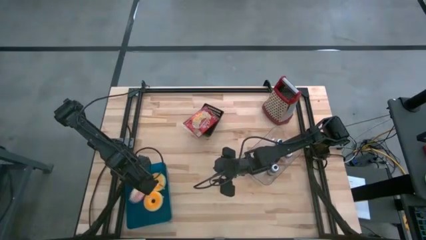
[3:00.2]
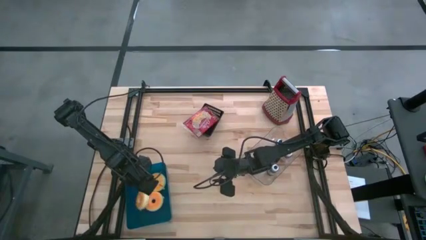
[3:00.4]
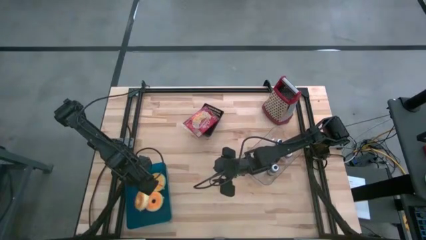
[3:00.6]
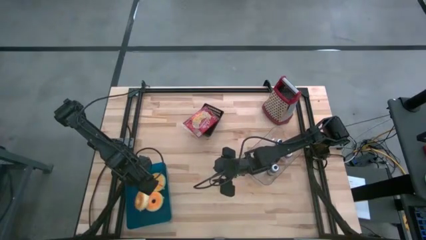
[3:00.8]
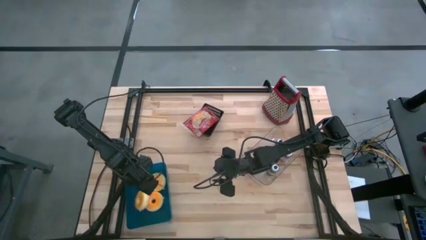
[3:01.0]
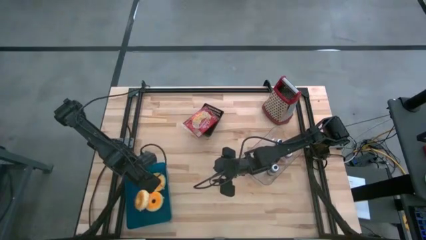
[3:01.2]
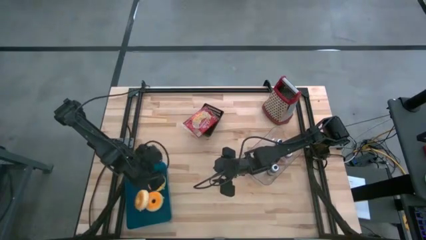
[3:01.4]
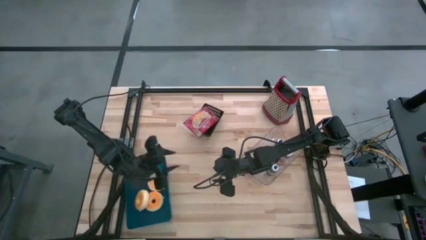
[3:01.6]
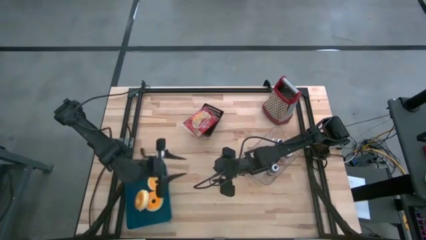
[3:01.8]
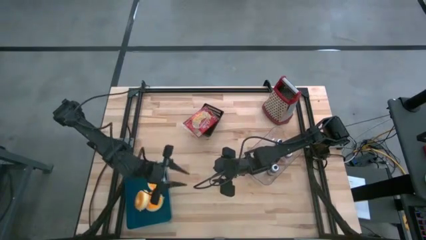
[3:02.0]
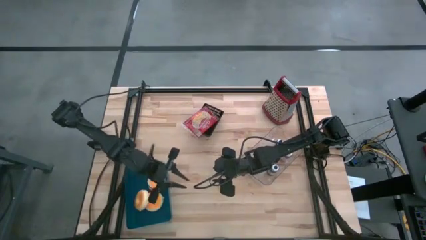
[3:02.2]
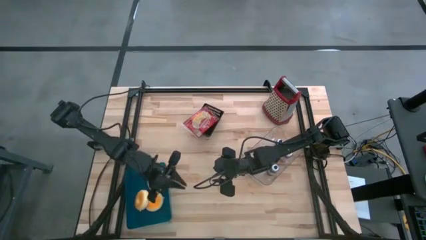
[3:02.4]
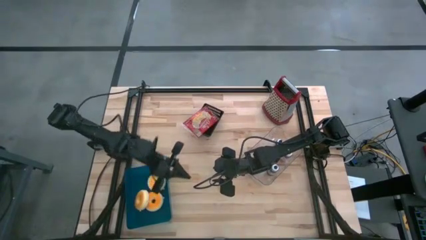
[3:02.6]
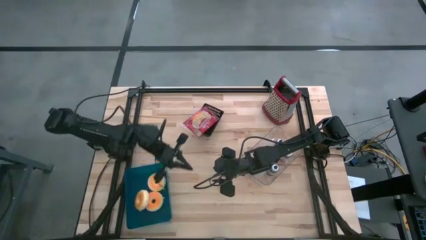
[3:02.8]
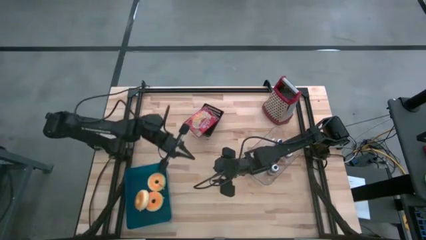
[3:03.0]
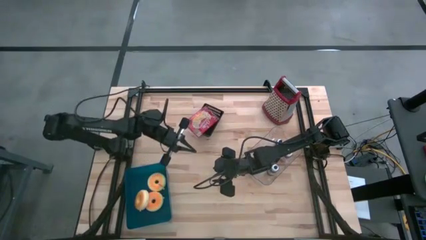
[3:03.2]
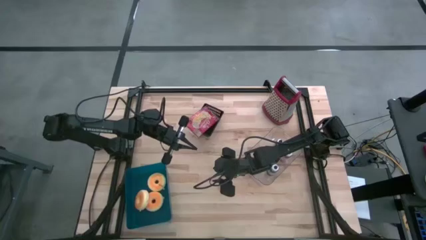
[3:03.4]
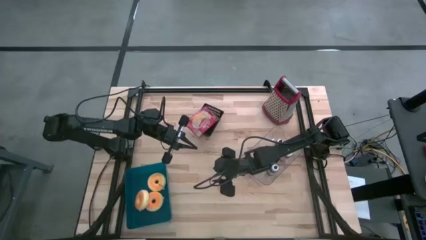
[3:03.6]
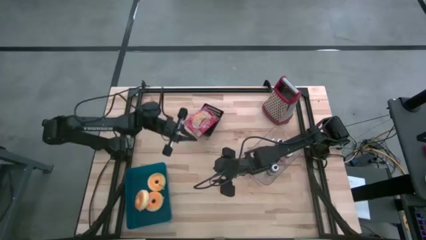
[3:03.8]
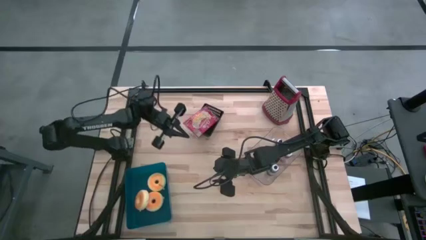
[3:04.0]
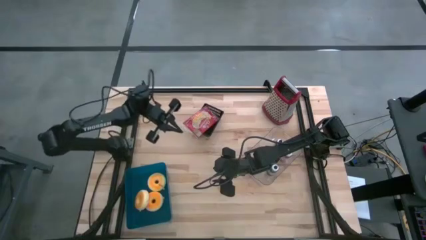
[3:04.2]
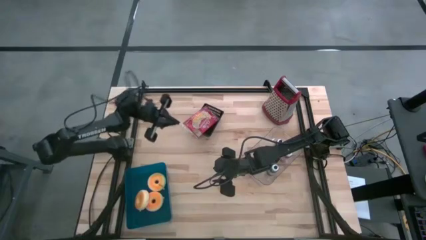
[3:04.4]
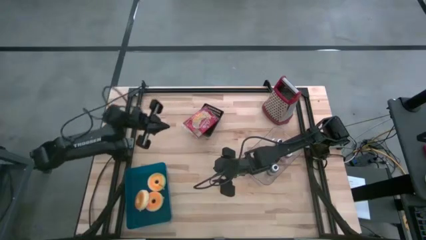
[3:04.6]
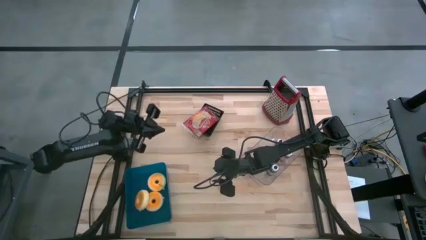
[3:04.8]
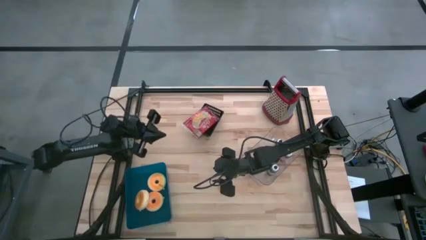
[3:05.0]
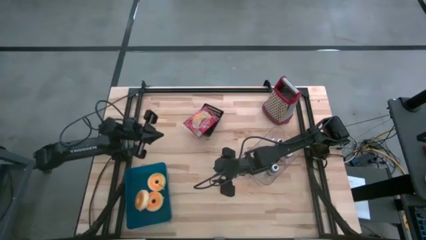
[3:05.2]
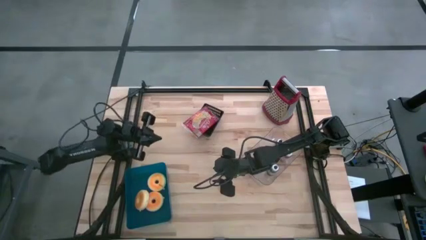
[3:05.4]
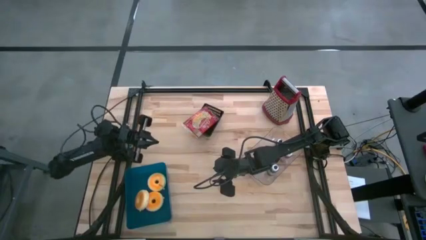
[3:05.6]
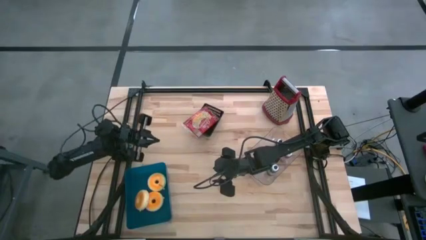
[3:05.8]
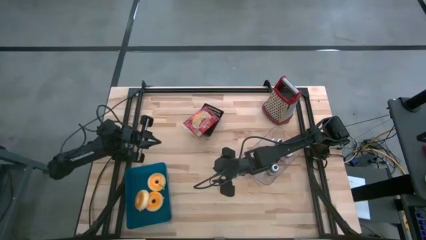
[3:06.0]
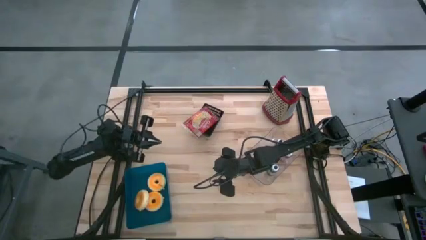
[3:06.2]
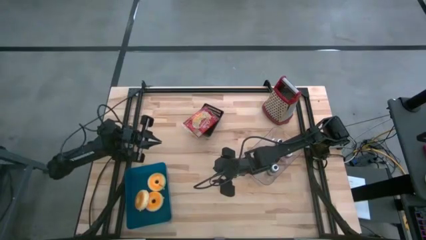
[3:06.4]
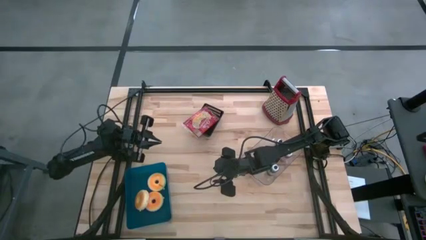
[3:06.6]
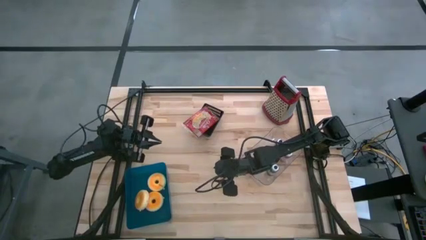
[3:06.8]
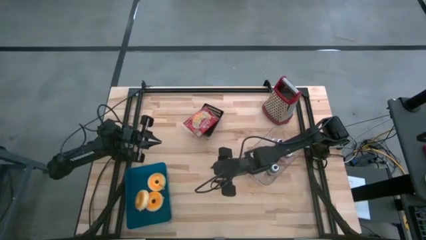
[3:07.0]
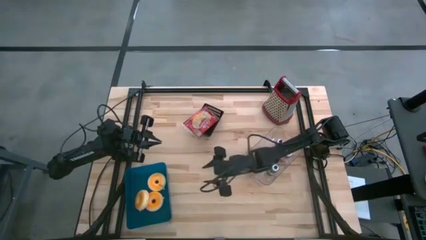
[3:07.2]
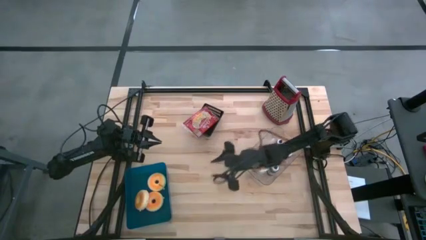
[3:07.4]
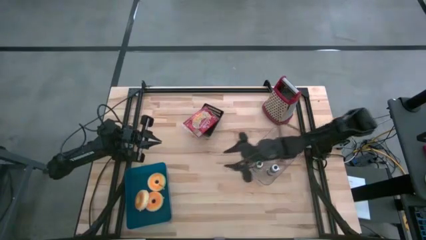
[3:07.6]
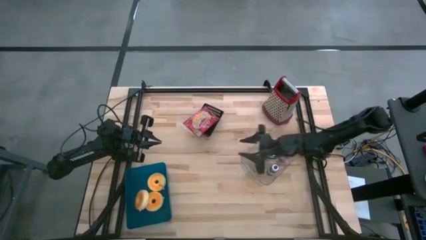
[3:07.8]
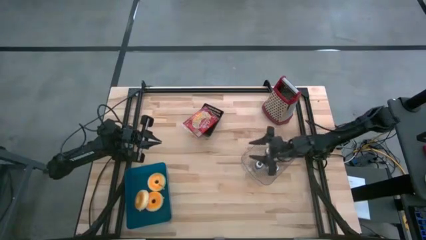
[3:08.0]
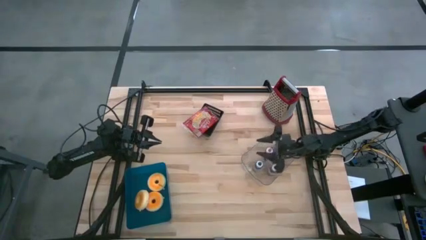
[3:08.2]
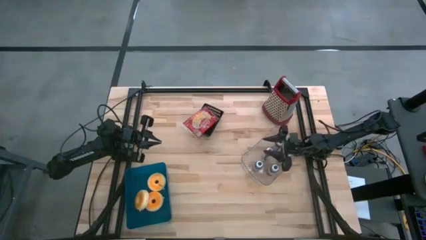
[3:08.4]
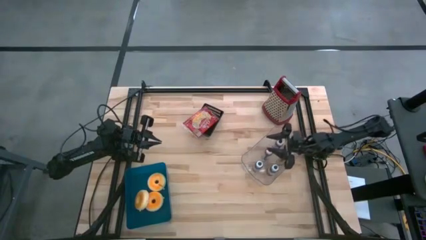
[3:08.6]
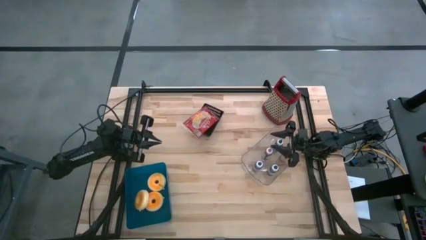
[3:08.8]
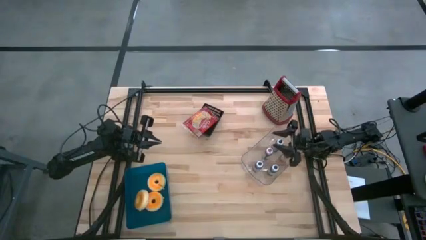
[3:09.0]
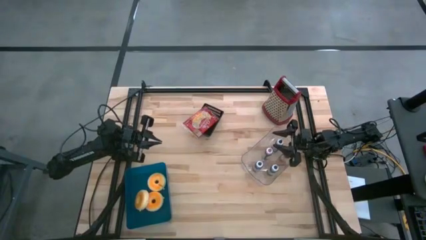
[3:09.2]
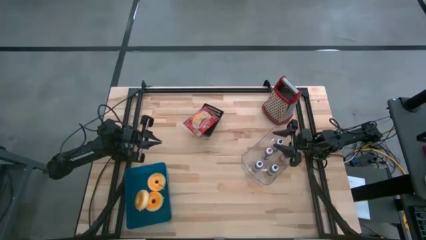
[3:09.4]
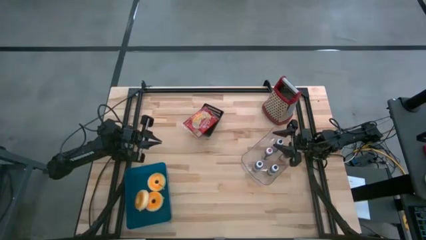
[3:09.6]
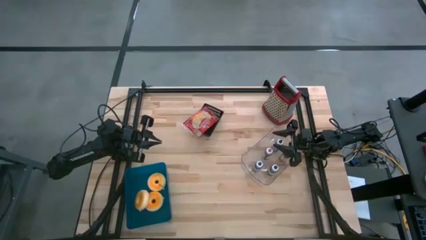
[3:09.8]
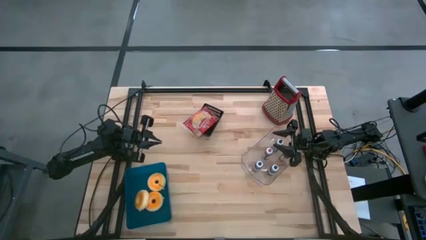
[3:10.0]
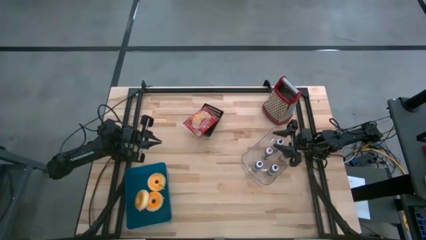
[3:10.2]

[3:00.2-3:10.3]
Task: Pick & Place Food Item
Return to Home Position

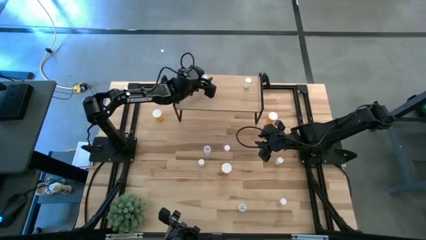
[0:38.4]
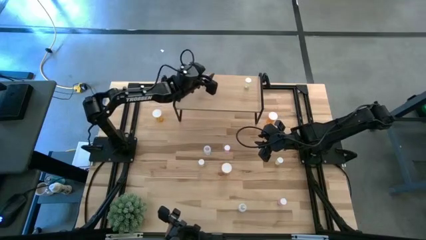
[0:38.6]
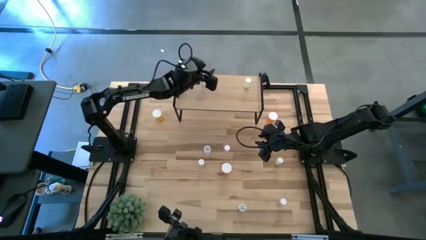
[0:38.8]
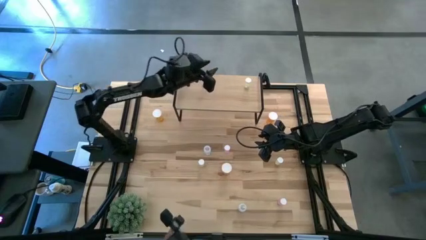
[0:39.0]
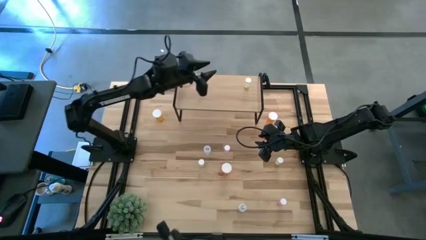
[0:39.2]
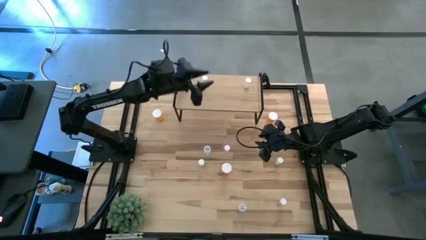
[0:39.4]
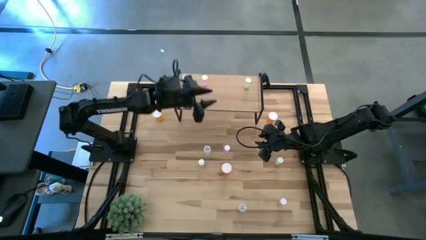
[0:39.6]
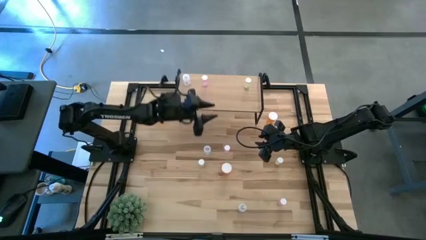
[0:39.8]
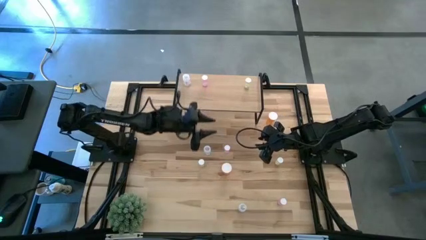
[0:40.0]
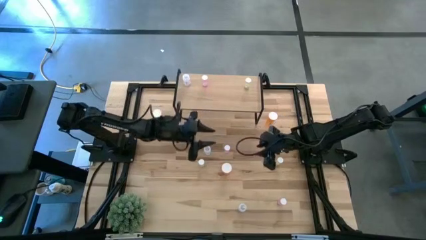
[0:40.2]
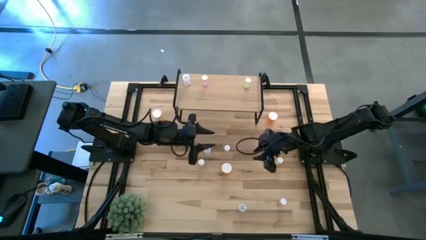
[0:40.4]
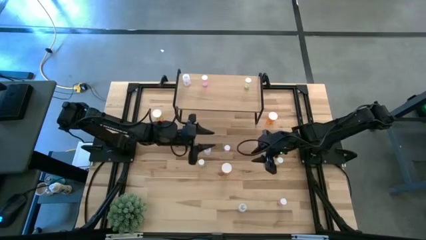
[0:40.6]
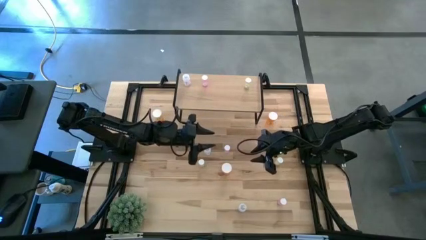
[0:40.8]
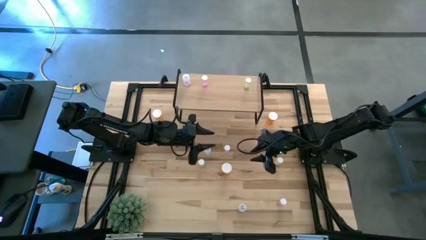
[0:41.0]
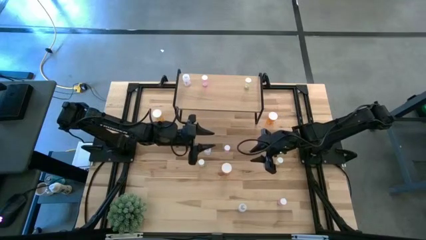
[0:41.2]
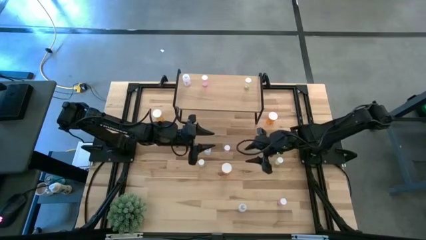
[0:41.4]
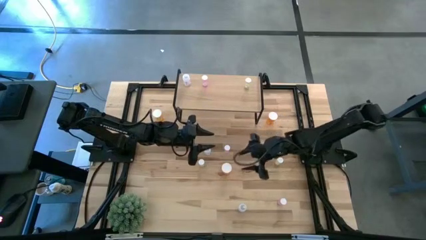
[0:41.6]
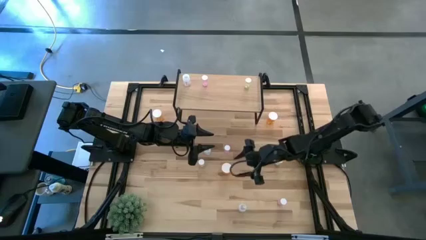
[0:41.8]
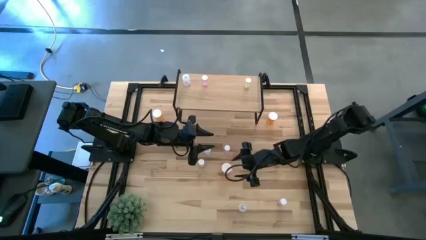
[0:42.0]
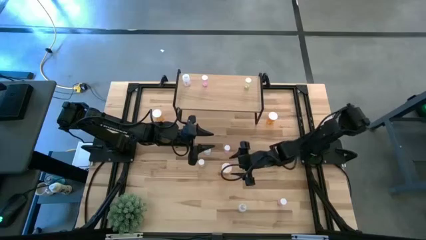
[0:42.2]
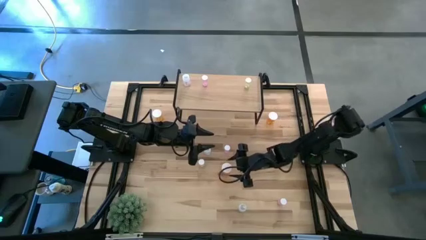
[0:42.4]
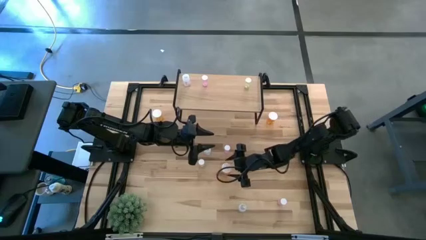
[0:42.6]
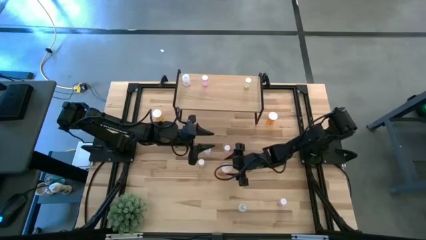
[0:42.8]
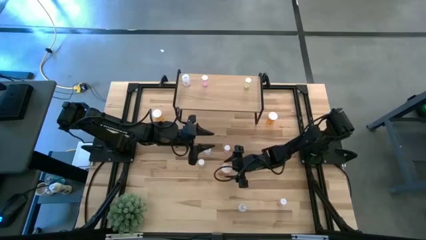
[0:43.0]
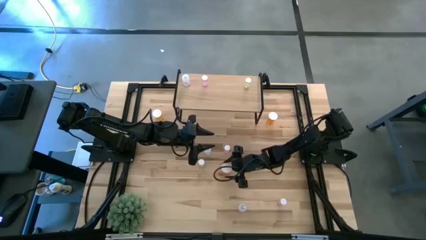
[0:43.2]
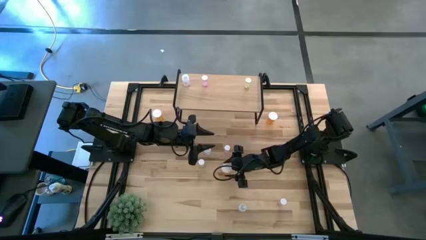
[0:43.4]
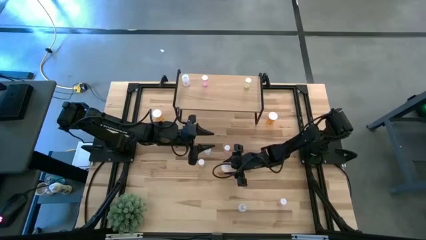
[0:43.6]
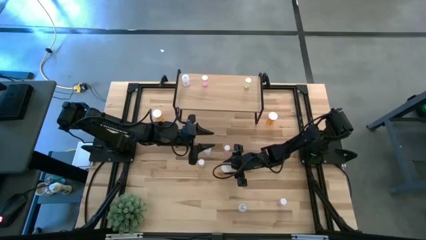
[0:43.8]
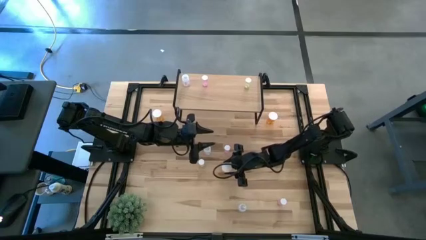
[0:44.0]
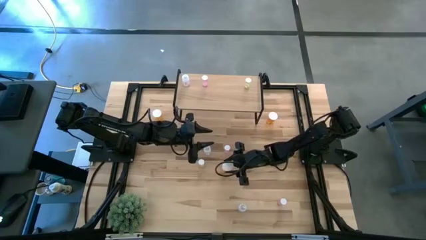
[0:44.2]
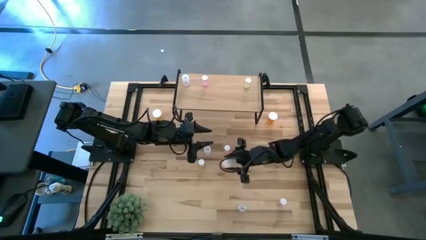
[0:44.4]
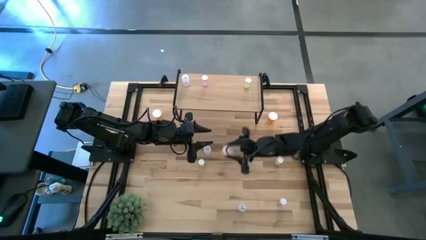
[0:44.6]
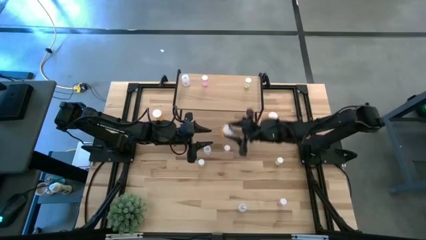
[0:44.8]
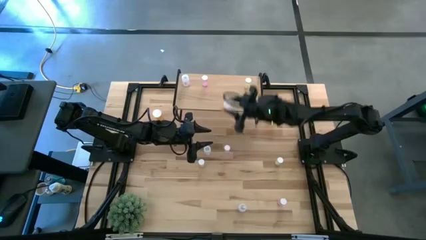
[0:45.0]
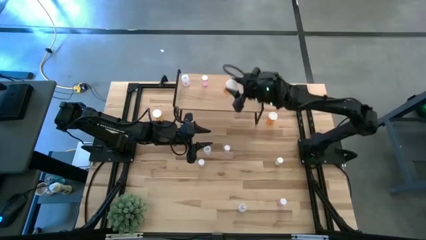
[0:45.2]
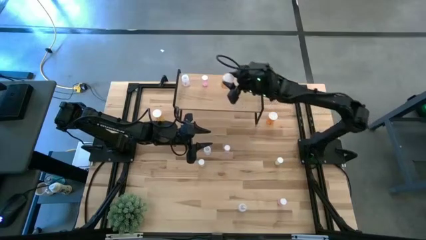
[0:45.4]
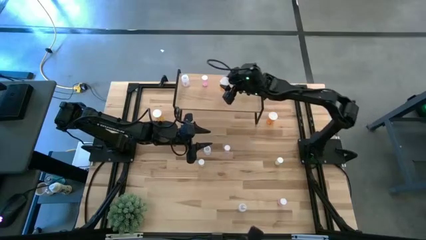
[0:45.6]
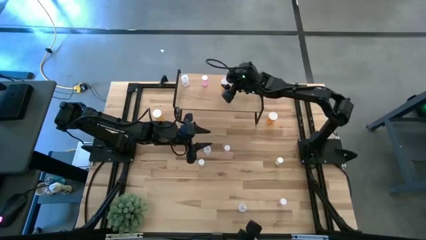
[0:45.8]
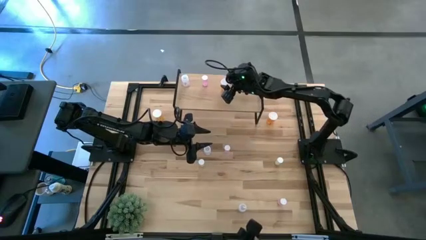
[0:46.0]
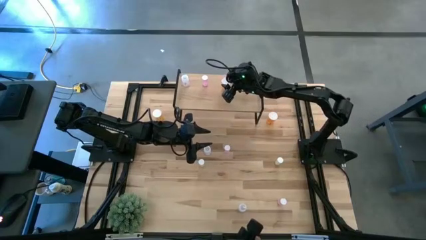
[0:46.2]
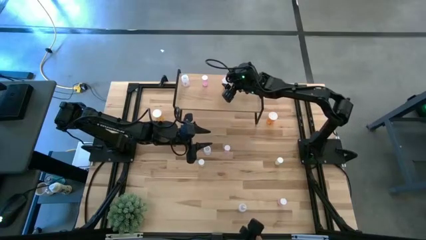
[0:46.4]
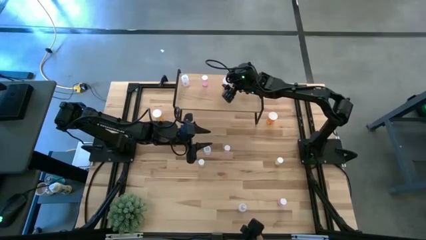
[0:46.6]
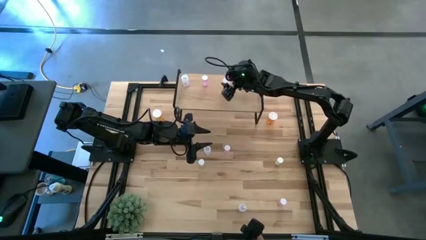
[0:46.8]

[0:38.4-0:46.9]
Task: Pick and place medicine bottles onto shelf by color
Put the middle bottom orange pill bottle on the shelf
